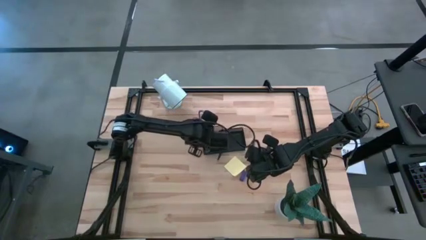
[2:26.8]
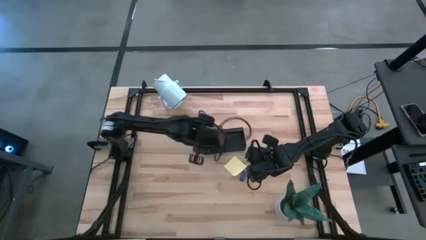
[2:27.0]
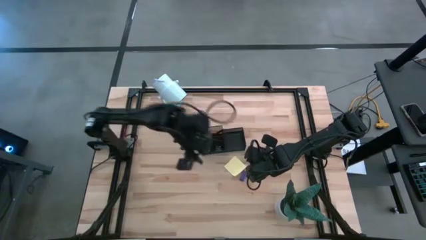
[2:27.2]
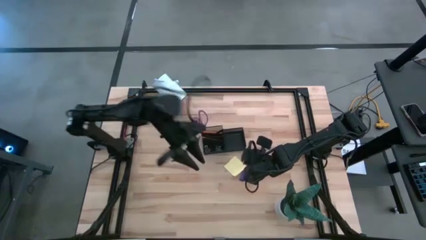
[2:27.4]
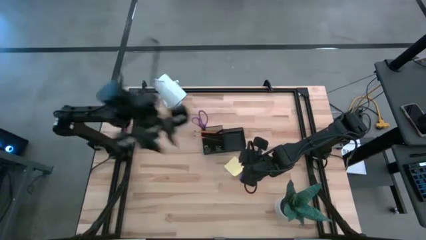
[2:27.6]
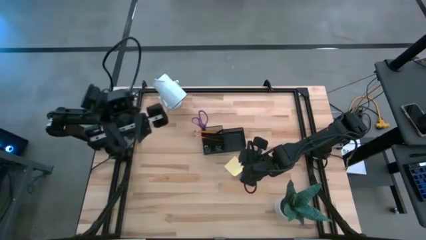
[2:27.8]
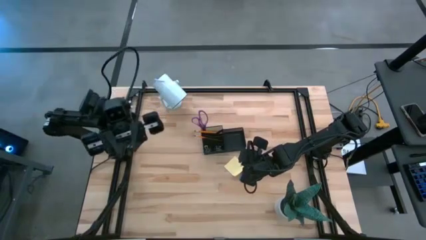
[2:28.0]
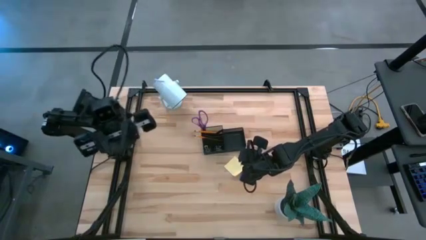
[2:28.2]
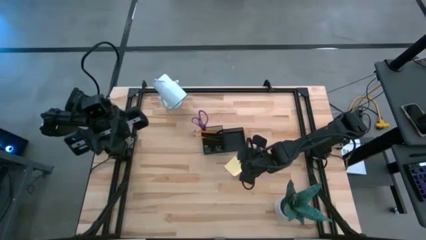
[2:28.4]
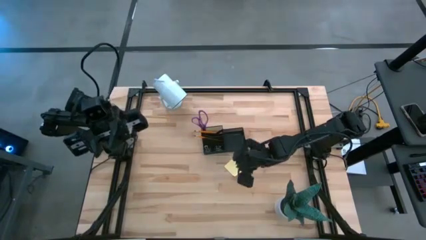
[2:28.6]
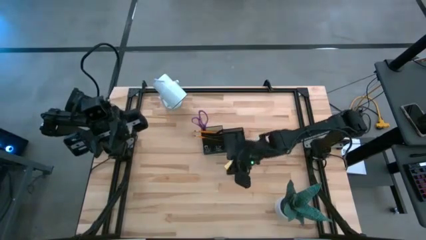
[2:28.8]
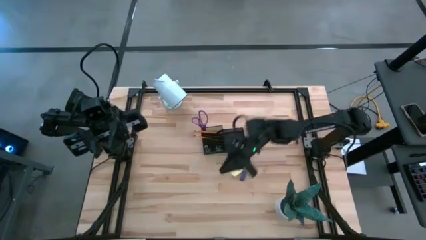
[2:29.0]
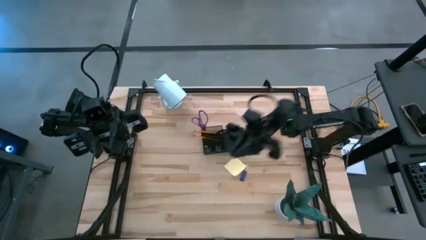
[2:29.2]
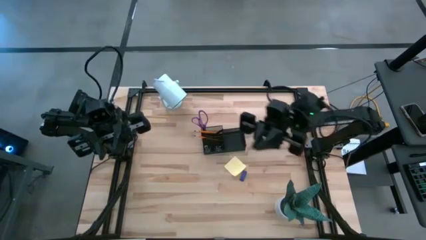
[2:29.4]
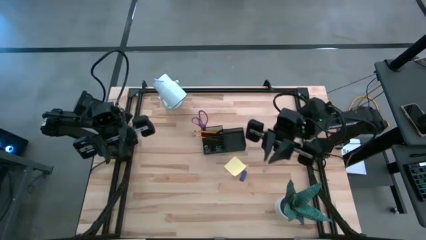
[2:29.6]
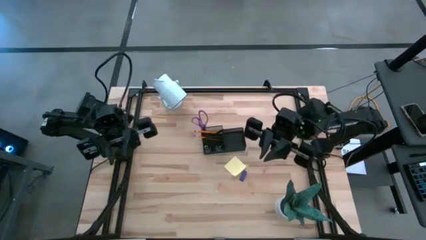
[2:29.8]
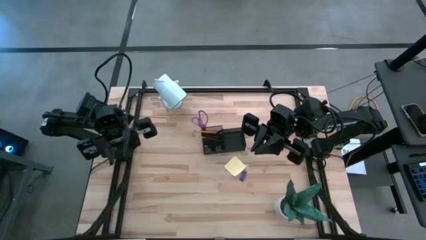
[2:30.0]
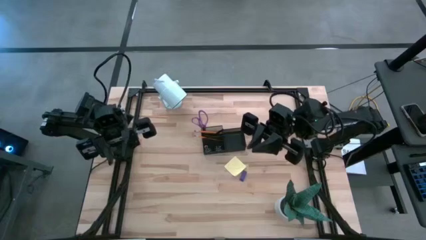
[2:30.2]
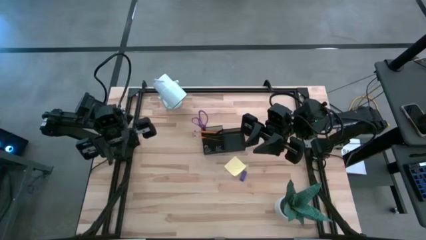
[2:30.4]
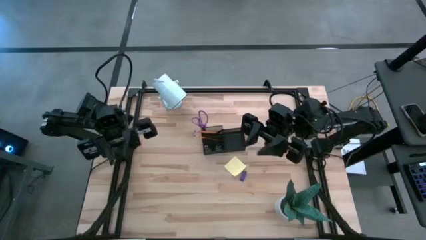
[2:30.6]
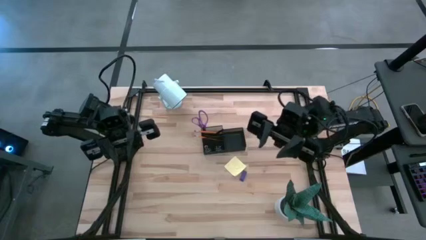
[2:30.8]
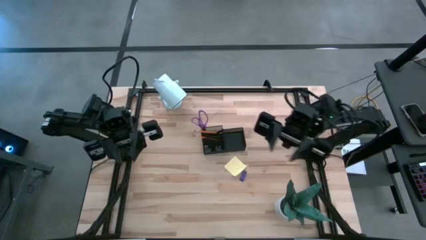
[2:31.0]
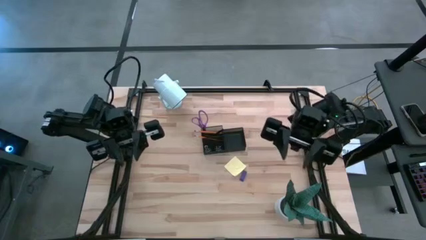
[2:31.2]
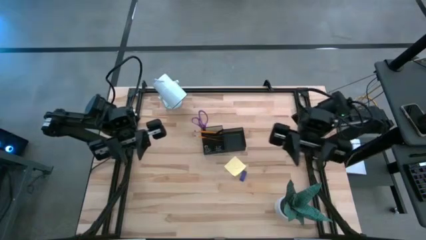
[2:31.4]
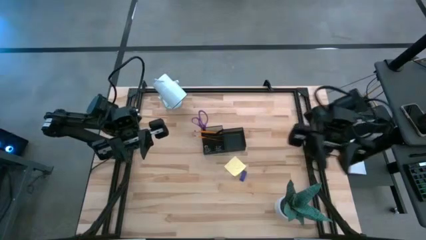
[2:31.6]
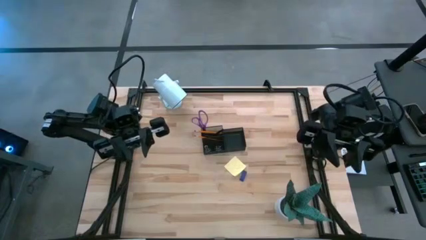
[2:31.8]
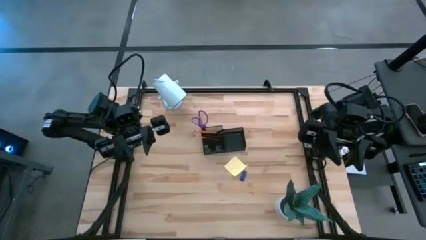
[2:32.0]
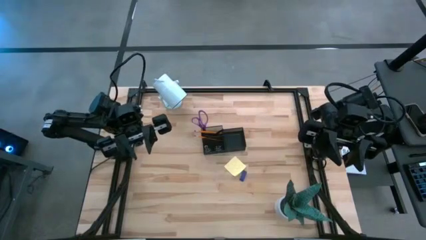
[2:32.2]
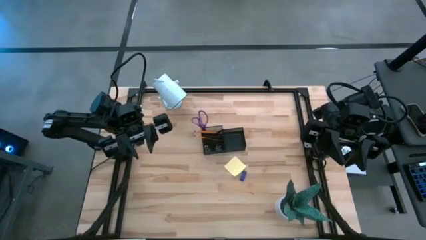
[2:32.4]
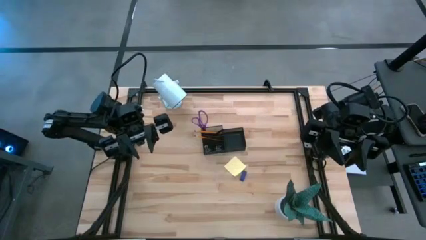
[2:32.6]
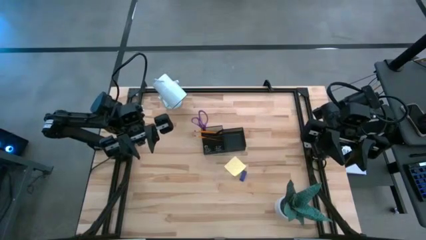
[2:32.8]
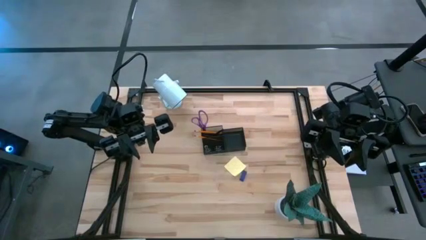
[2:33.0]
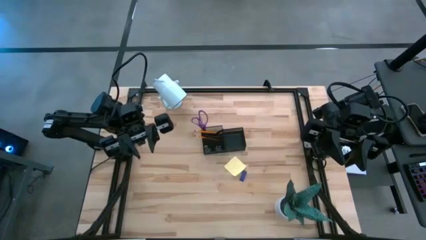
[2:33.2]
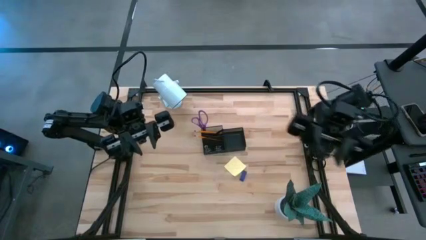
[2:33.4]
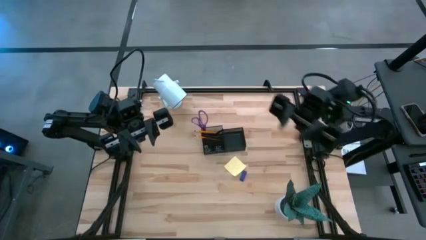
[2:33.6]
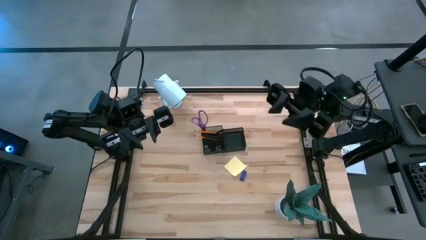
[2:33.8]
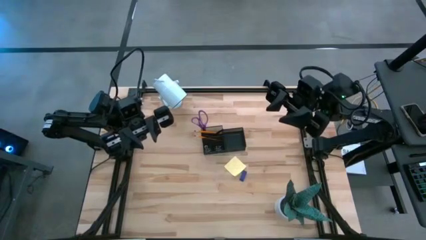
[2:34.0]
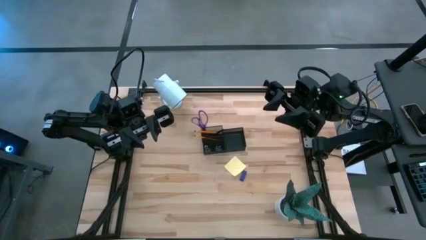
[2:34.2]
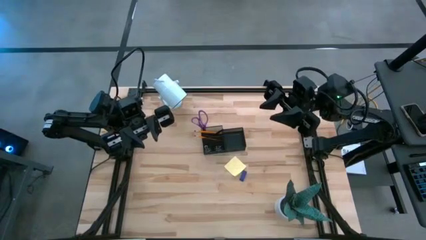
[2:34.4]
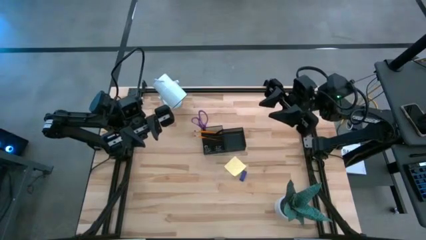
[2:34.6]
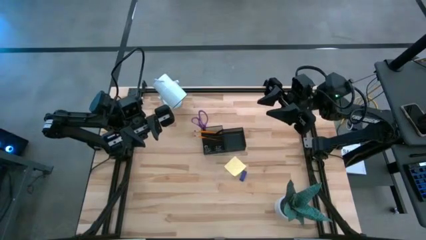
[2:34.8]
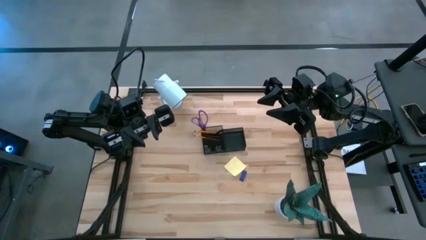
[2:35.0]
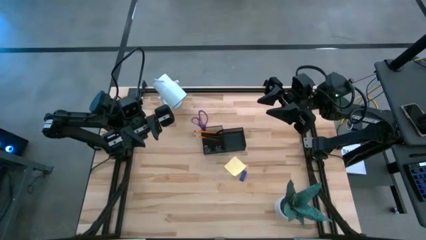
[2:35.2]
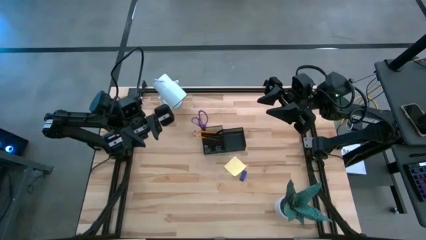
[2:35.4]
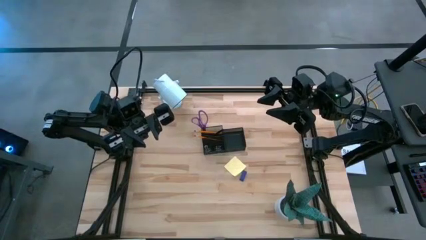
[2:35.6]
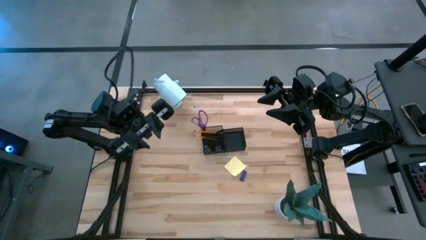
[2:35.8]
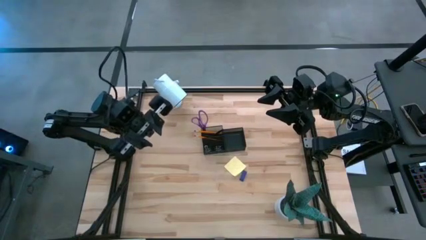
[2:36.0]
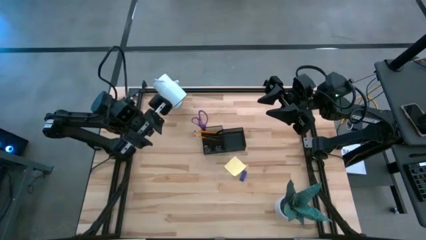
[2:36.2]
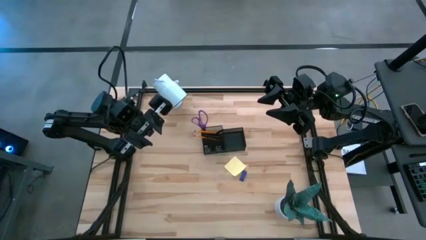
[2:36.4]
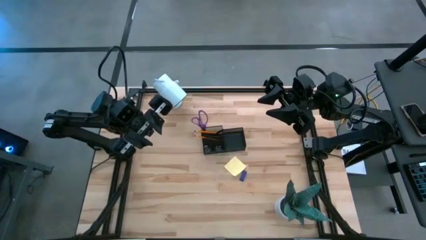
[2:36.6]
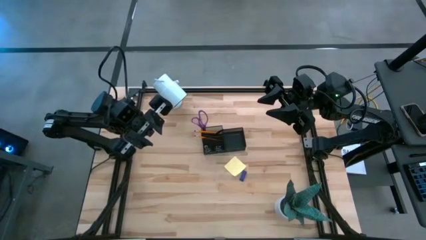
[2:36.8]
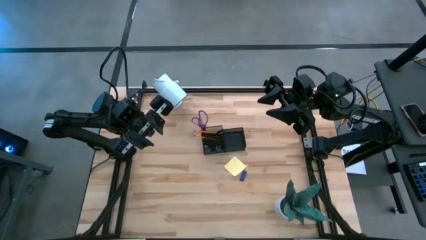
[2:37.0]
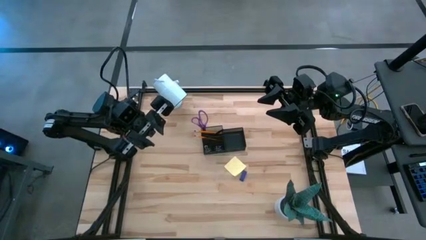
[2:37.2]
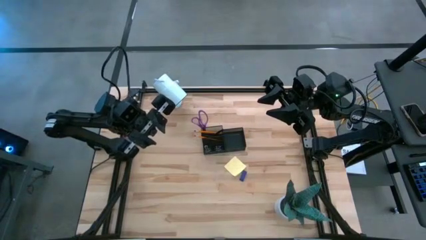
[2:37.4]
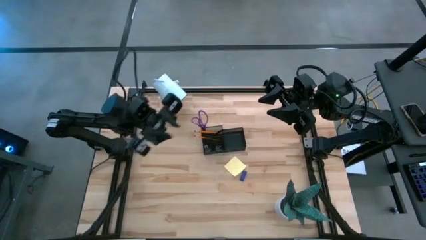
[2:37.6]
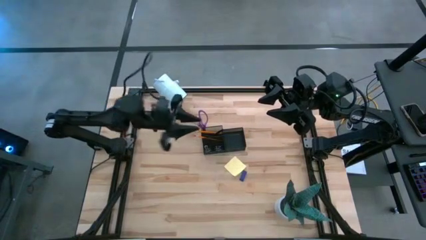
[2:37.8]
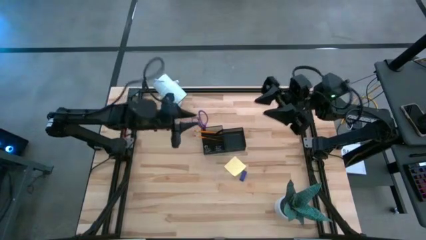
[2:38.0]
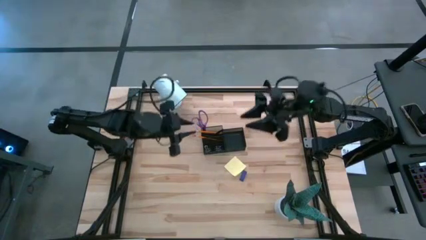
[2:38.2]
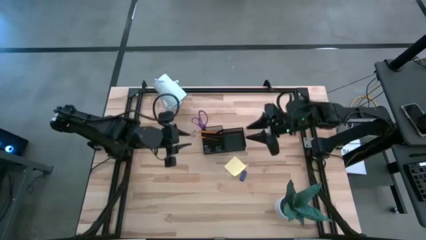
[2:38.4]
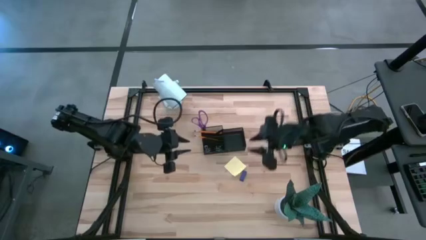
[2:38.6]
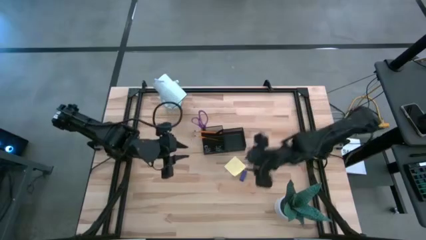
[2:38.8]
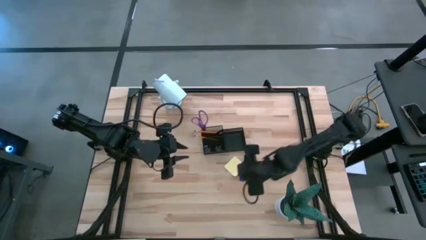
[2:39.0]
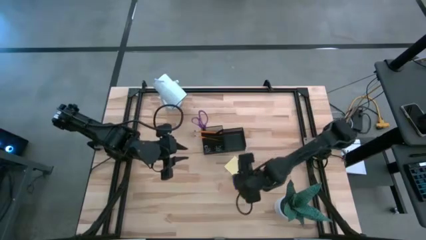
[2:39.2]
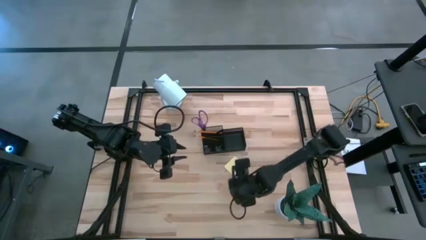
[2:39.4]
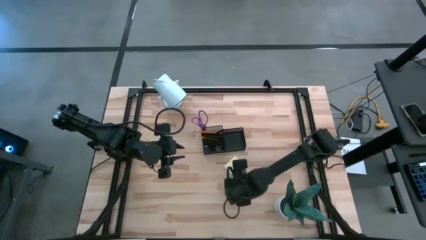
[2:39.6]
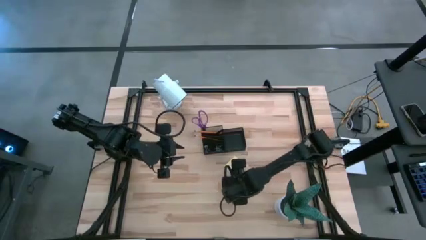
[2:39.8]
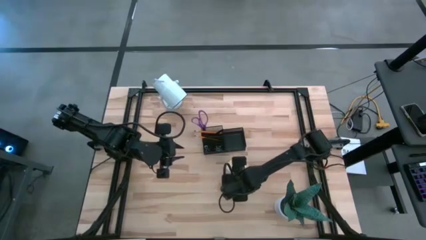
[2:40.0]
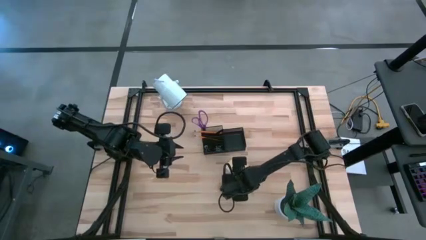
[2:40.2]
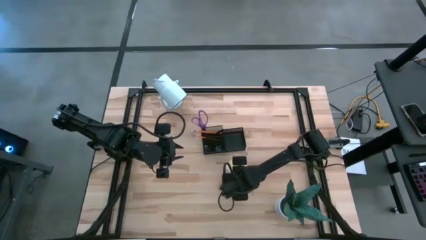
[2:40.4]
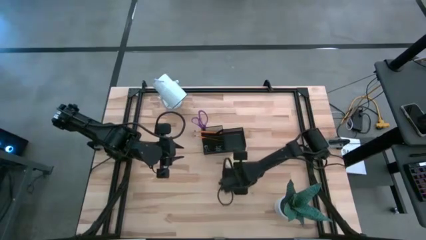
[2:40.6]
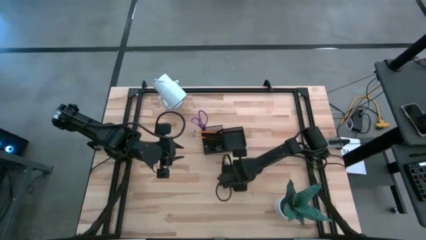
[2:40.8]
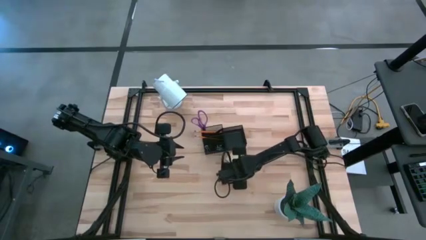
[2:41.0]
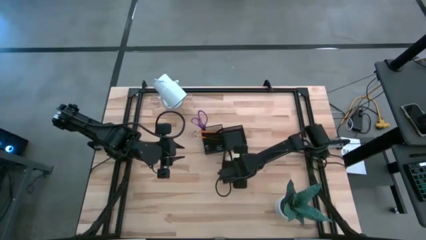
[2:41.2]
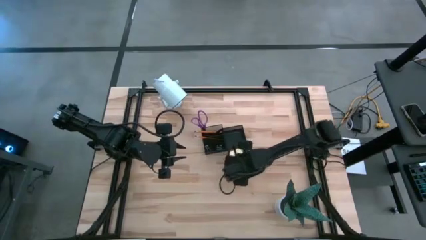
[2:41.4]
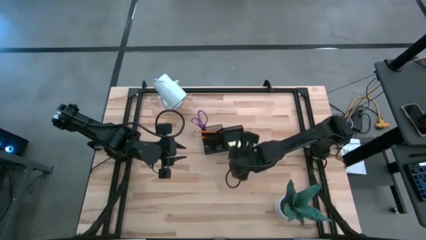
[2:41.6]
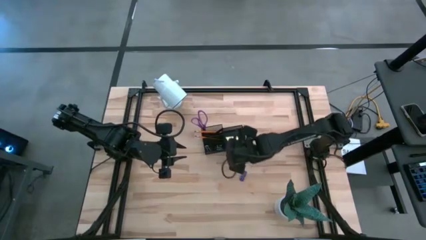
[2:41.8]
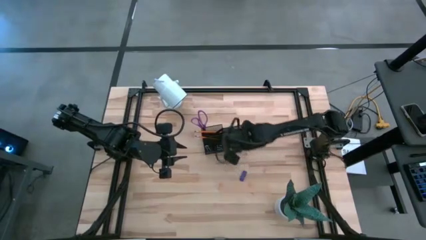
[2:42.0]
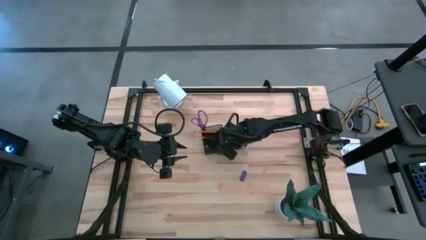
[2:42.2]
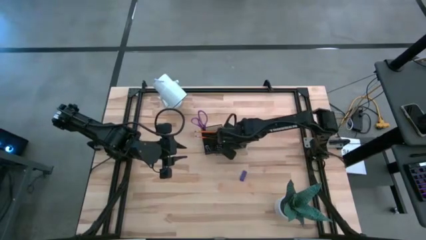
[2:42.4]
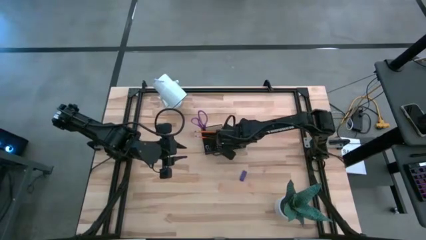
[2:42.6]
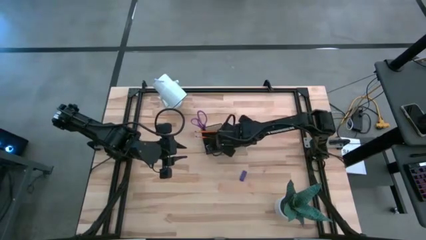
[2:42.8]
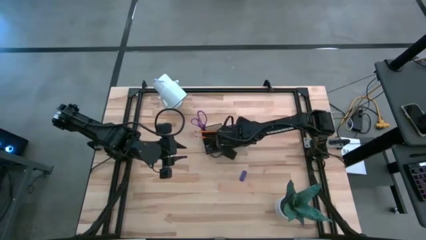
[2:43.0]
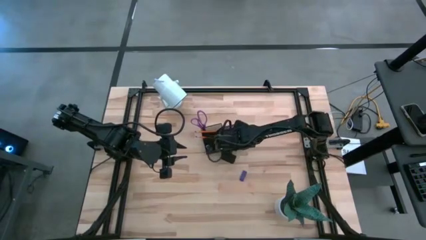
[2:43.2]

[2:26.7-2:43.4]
Task: Pick and place office supplies into organizer
Put the yellow sticky notes into the black desk organizer

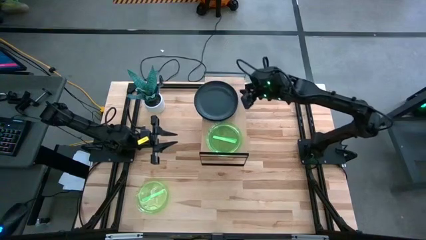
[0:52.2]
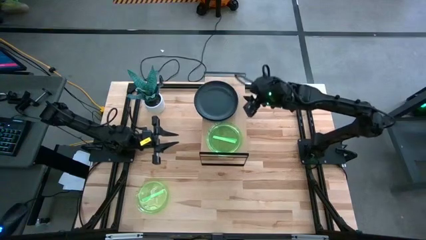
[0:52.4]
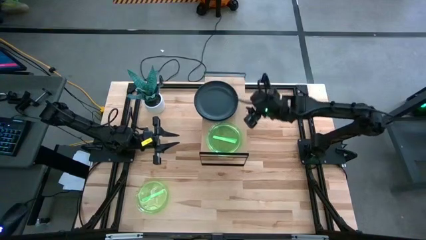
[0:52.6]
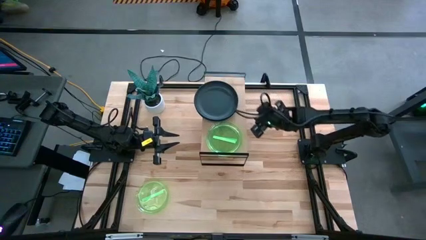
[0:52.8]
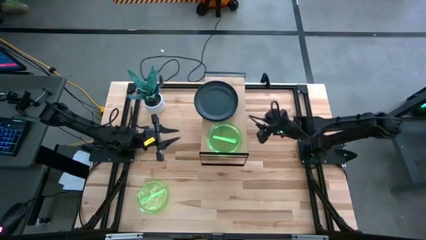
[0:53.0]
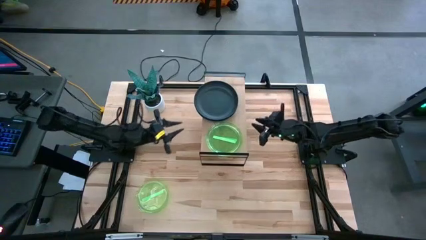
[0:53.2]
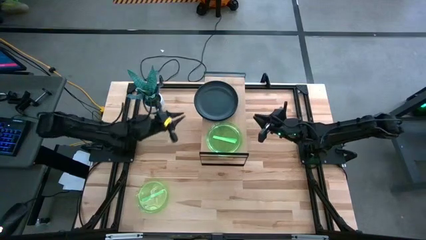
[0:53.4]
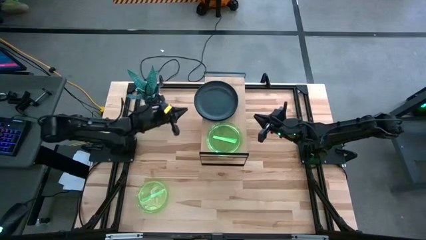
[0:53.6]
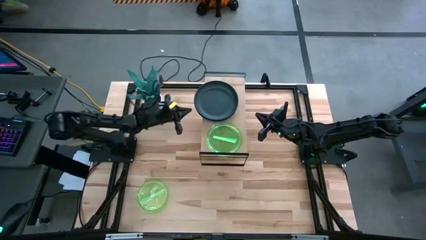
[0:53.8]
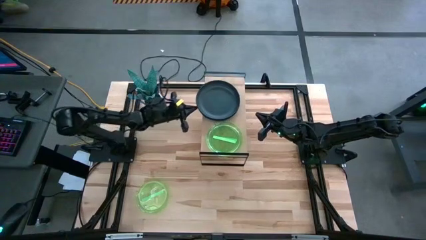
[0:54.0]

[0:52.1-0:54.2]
Task: Place and stack plates onto a shelf
Adjust the stacked plates on the shelf
